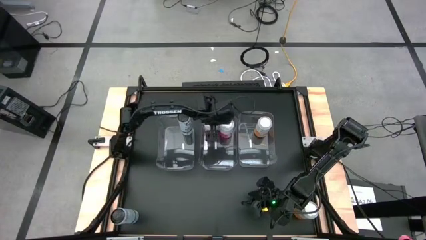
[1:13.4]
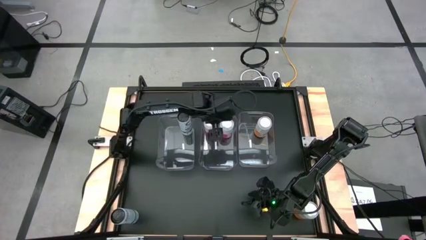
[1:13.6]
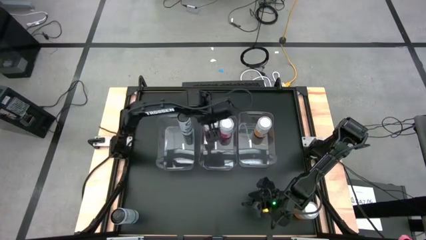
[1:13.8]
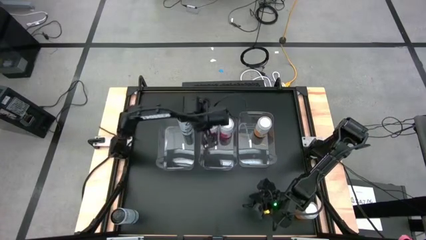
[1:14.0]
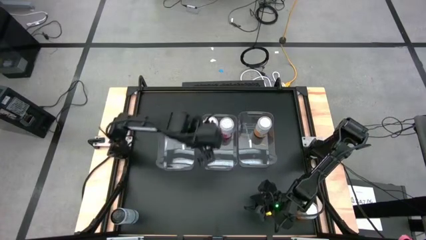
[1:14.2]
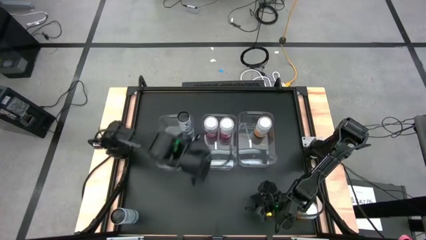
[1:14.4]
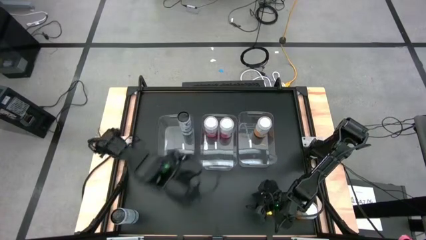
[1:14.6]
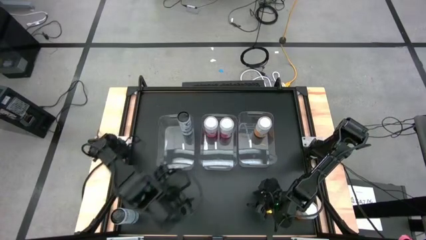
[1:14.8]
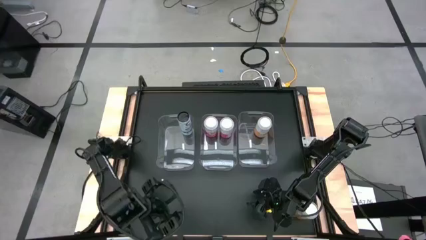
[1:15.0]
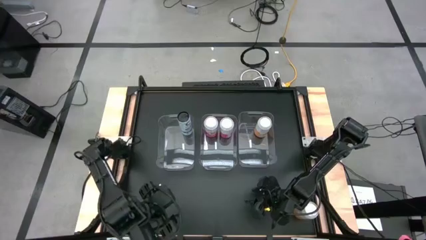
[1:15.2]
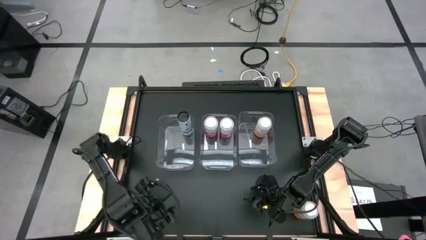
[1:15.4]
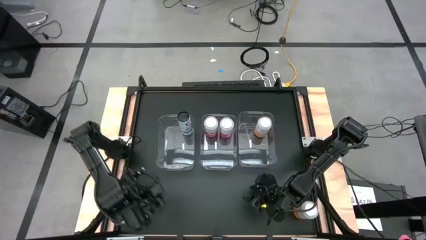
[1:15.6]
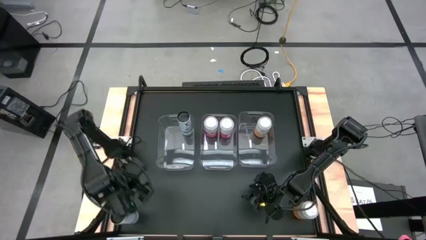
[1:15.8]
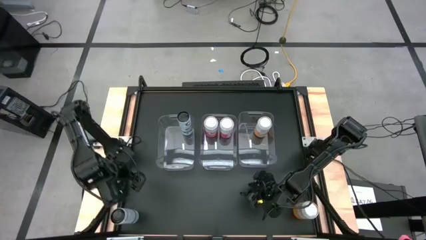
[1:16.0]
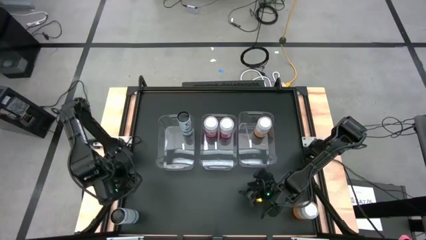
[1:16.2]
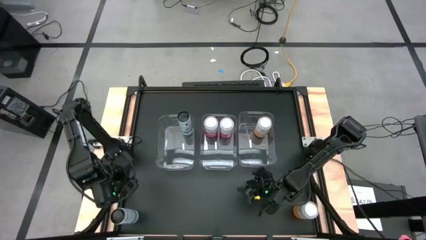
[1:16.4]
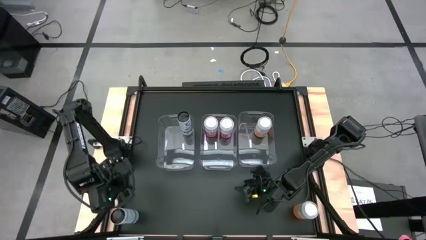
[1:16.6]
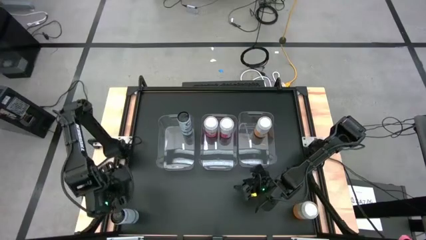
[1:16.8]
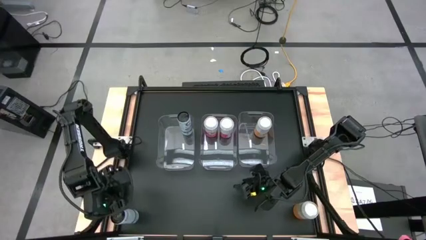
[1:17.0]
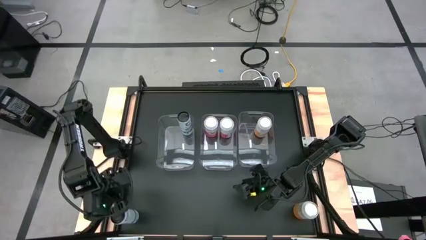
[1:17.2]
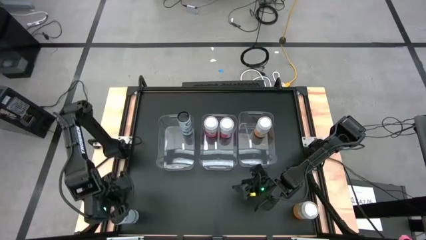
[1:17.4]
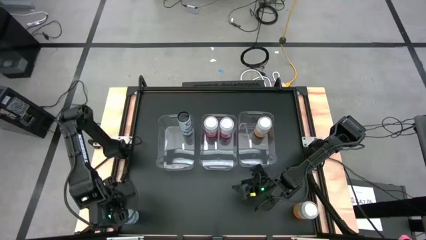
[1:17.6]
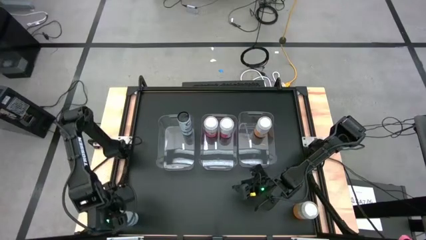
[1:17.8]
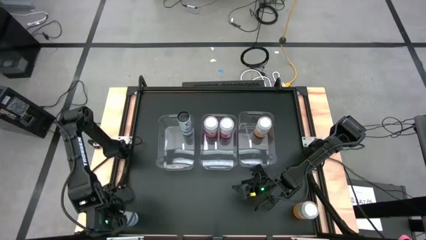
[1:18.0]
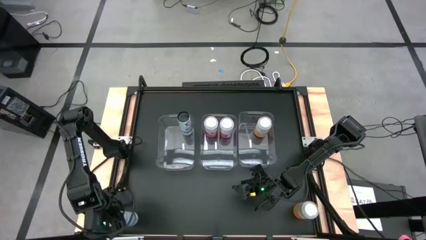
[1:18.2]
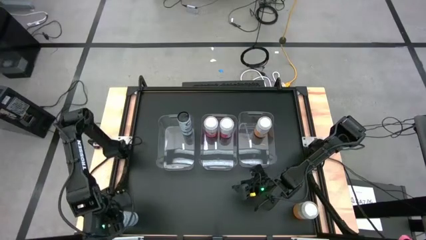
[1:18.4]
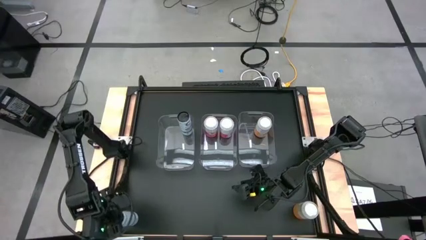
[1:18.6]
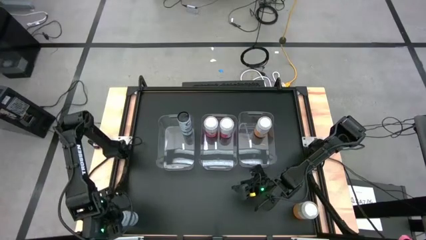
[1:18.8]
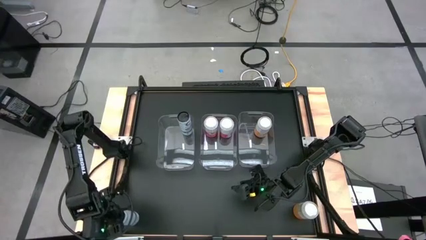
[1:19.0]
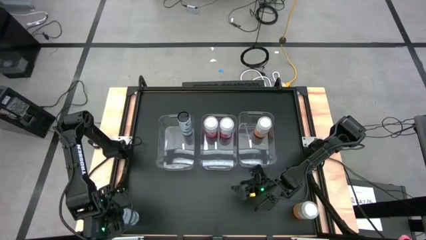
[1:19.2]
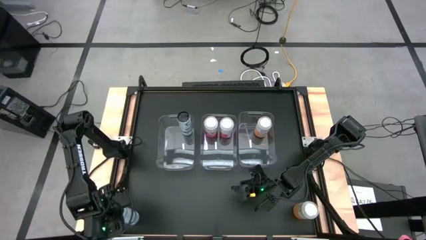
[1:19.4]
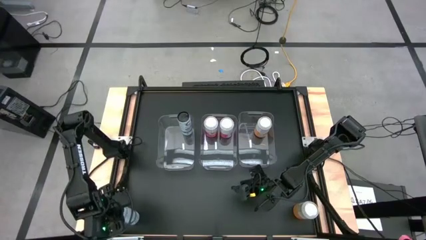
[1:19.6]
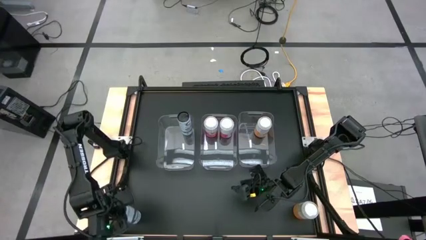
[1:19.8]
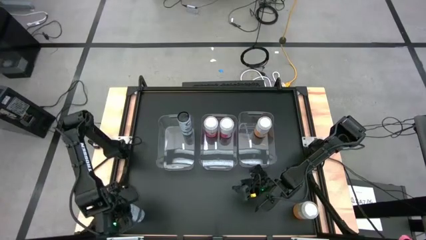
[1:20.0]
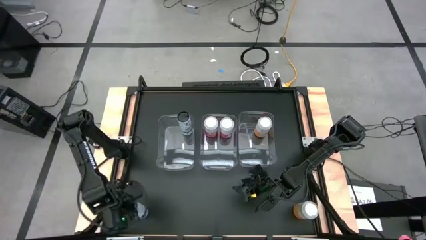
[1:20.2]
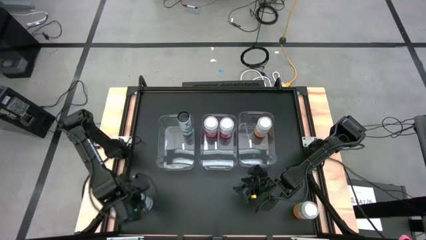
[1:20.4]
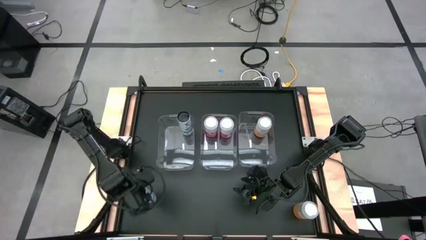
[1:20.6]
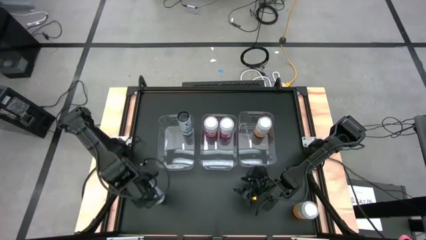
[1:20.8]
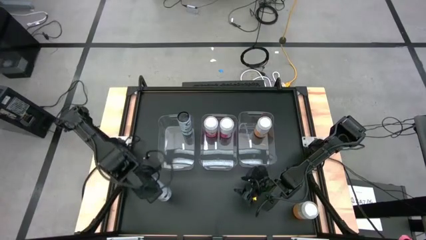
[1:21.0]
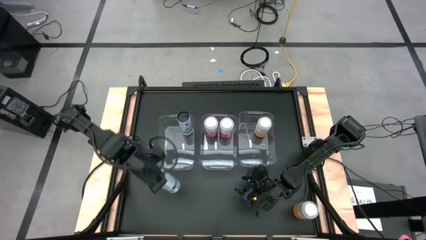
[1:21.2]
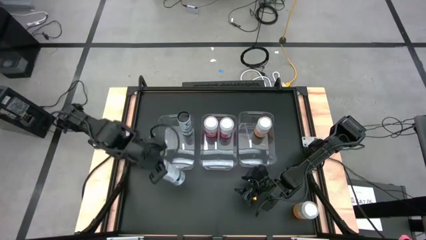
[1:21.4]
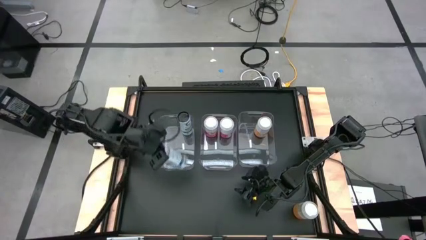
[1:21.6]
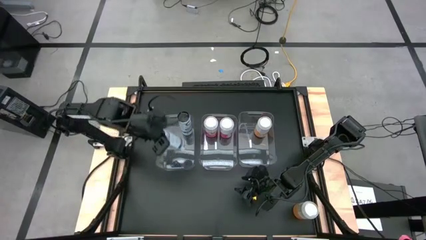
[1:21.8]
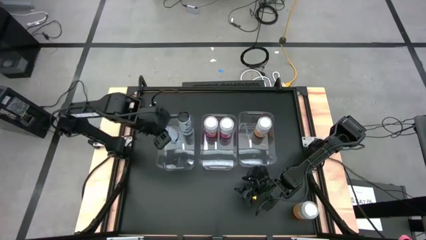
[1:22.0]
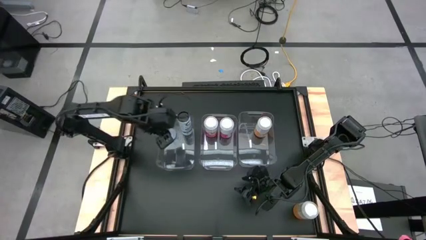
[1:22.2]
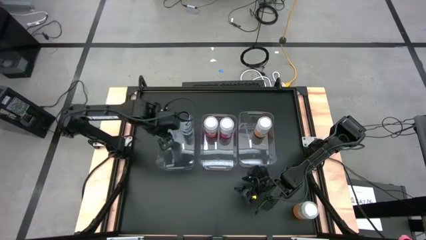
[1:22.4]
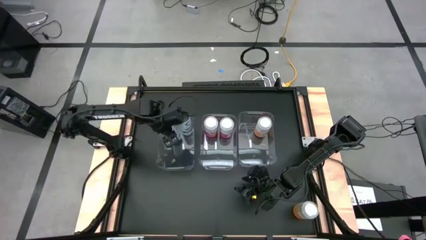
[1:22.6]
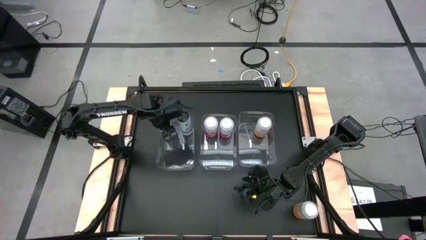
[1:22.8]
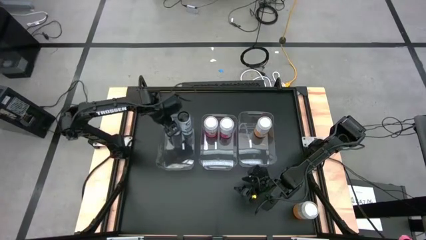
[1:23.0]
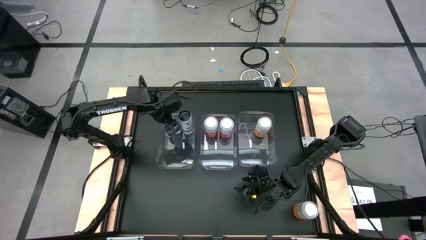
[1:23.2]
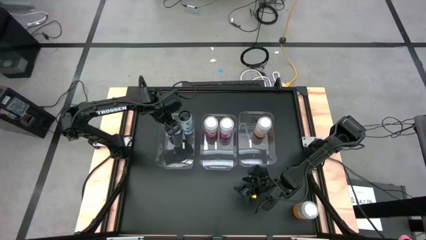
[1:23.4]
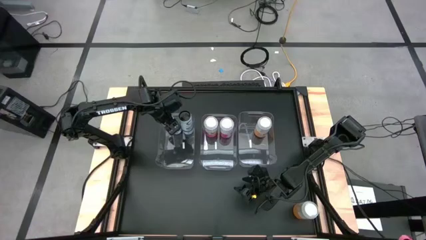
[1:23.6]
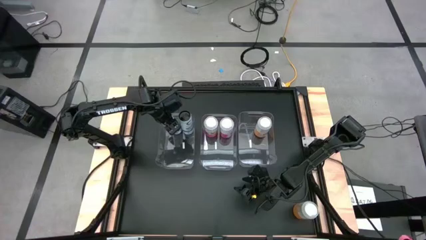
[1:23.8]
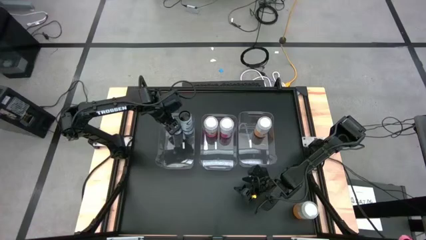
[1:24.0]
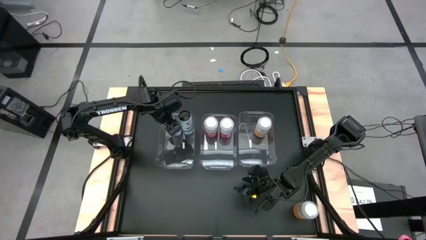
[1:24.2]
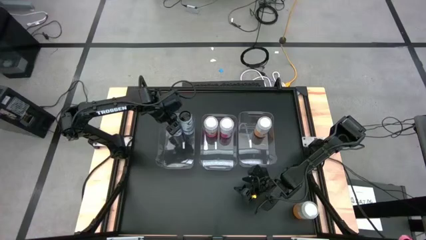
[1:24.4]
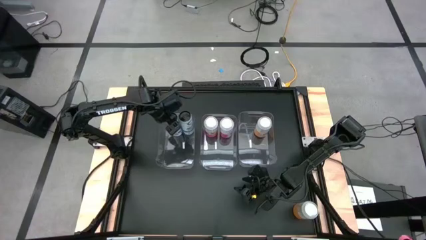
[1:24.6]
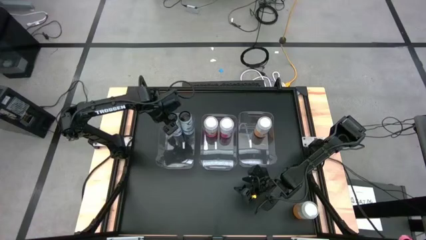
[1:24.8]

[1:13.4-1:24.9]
Task: Sort soda cans
Put the white soda can into the left transparent bin

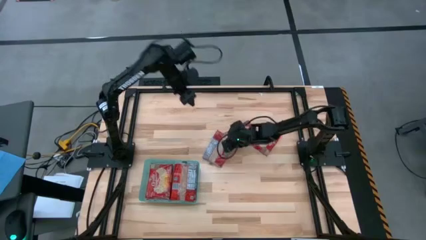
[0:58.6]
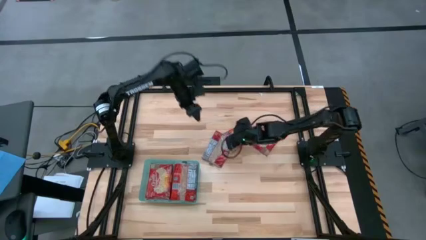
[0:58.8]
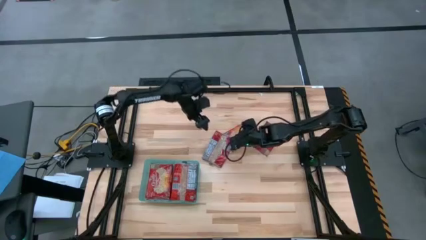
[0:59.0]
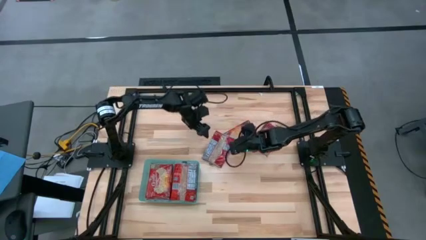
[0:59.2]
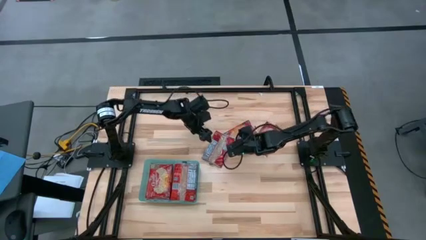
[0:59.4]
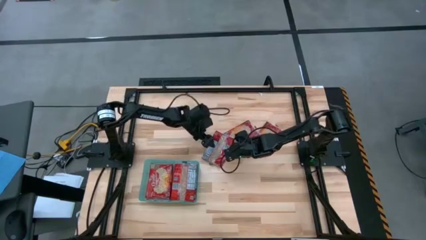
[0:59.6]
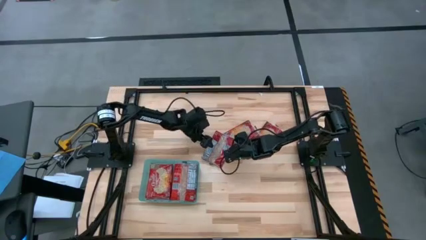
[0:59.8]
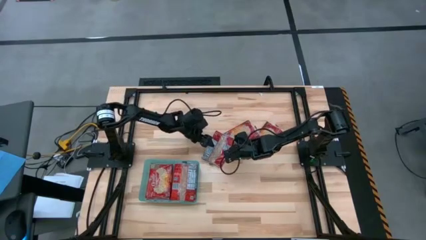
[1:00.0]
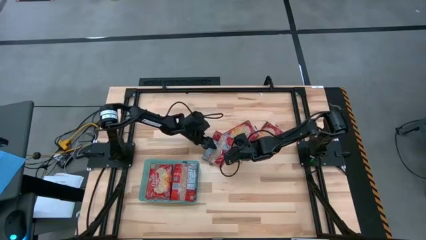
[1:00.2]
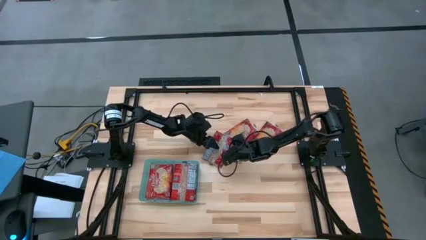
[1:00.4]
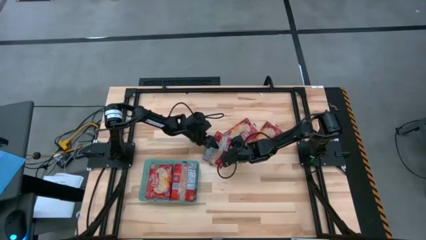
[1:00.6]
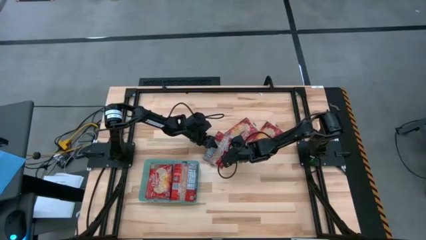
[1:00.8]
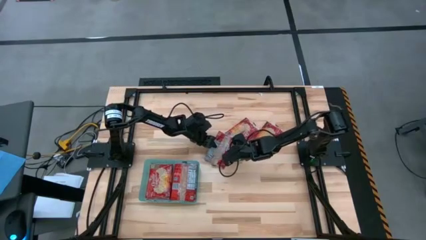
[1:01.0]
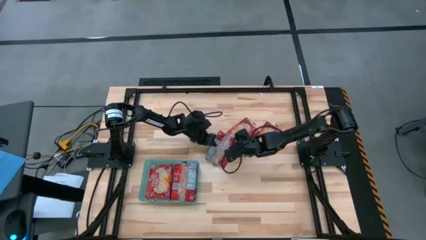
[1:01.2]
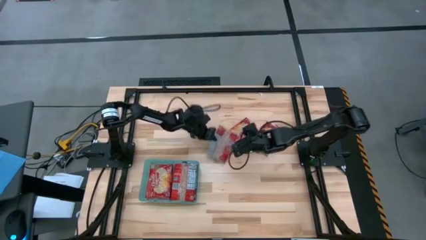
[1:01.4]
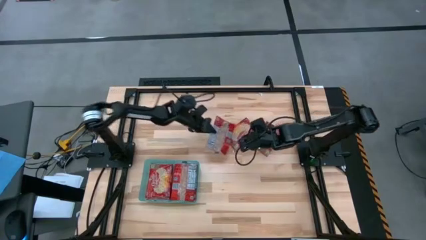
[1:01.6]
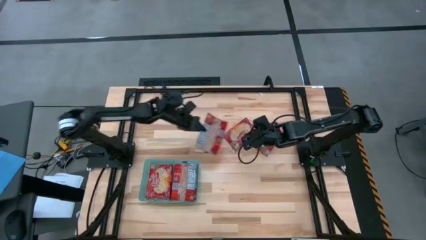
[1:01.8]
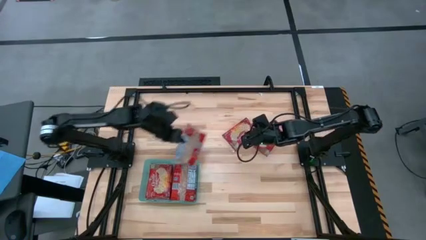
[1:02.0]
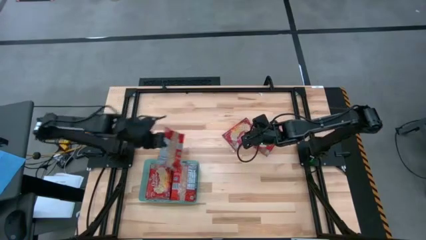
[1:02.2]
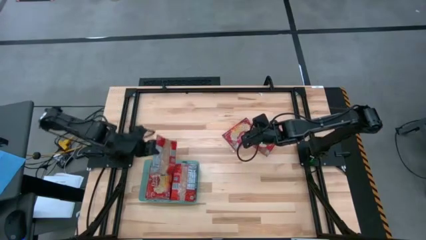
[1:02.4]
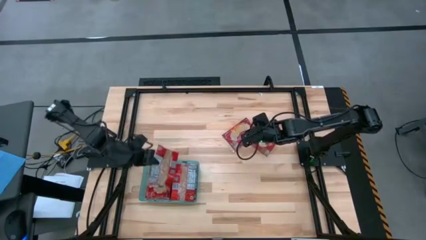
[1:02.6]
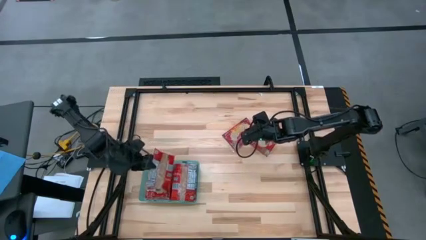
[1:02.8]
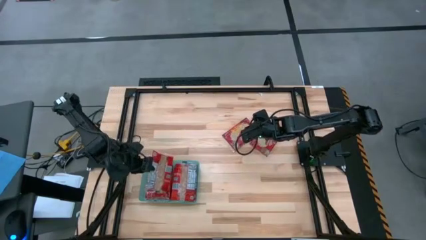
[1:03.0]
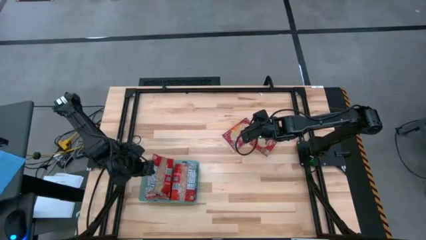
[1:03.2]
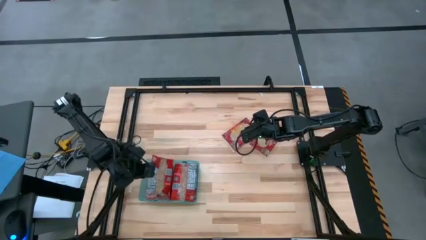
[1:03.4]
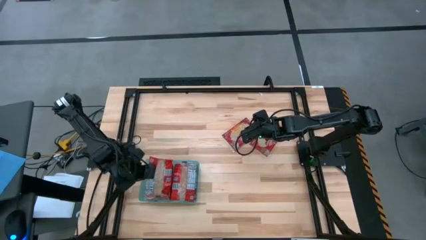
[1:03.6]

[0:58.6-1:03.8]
Task: Sort popcorn bags into baskets
Put the red popcorn pack into the green bin
